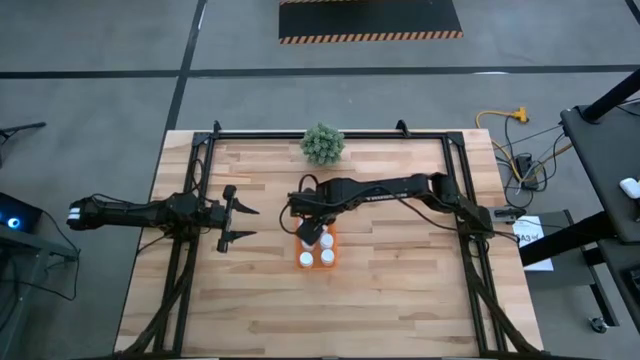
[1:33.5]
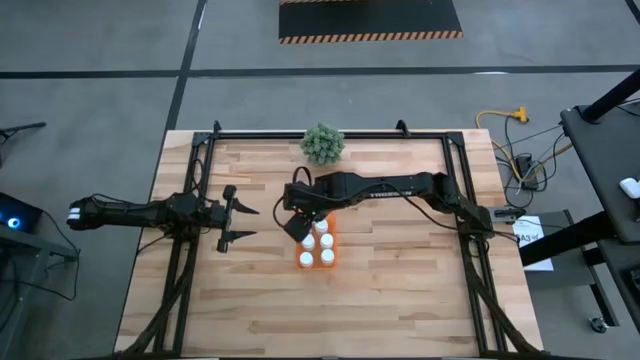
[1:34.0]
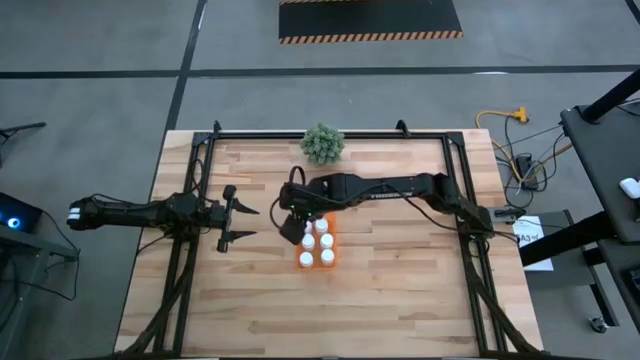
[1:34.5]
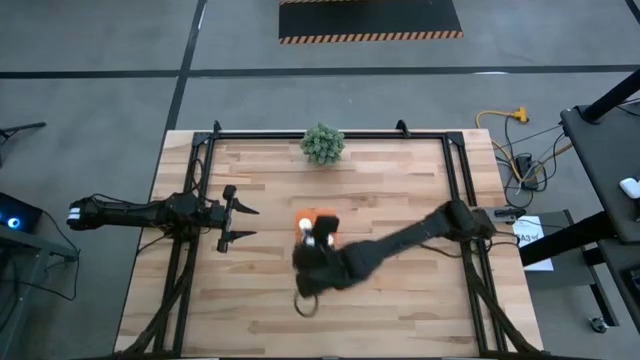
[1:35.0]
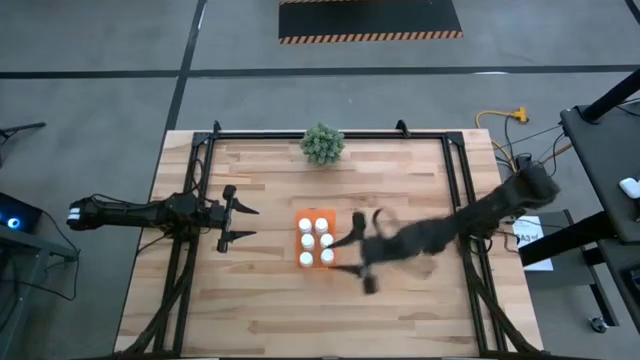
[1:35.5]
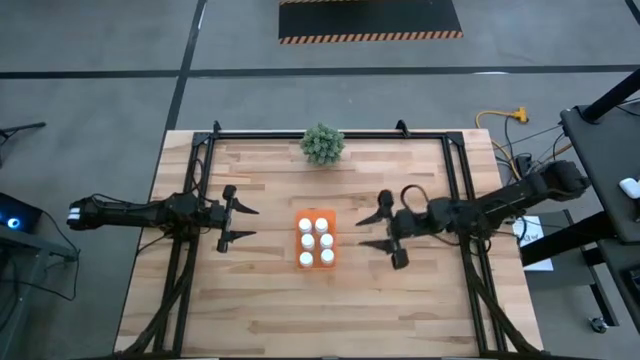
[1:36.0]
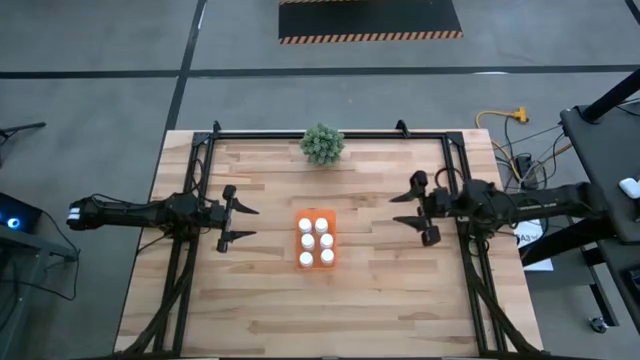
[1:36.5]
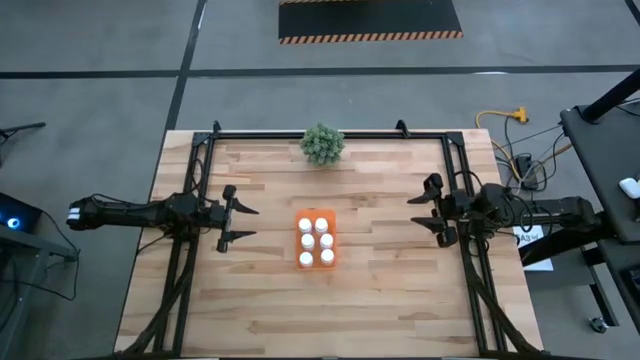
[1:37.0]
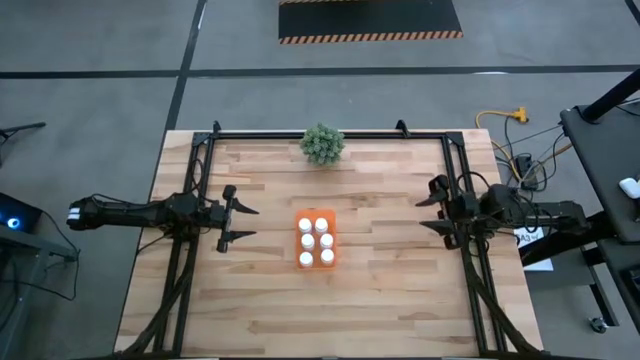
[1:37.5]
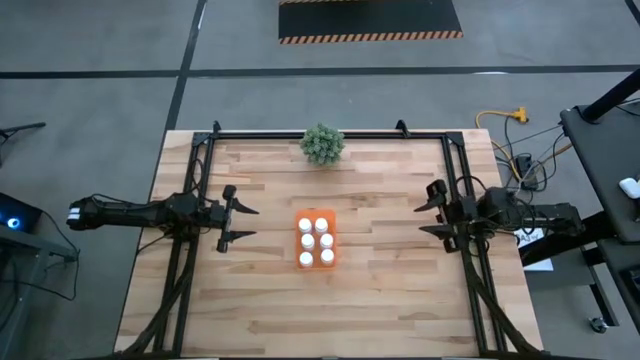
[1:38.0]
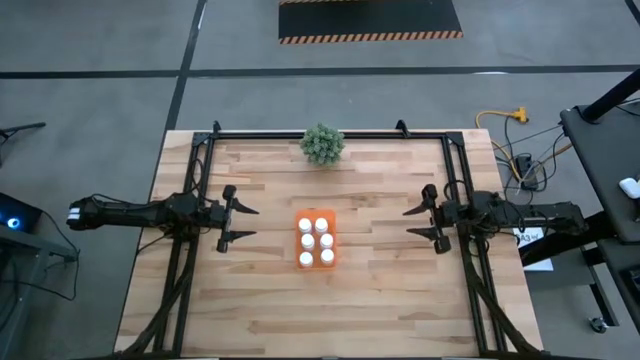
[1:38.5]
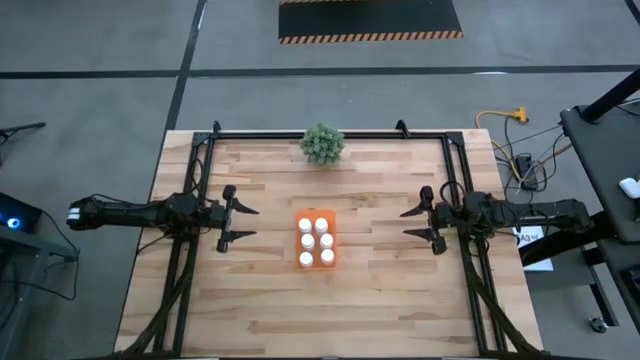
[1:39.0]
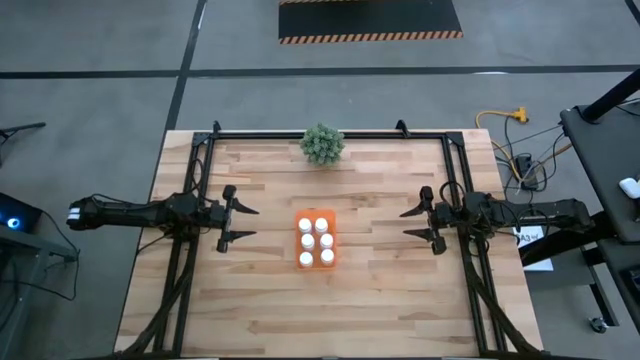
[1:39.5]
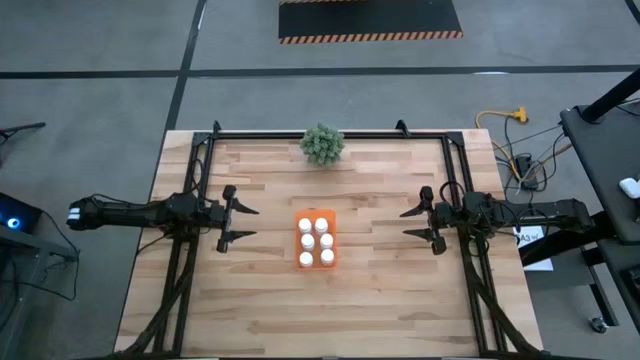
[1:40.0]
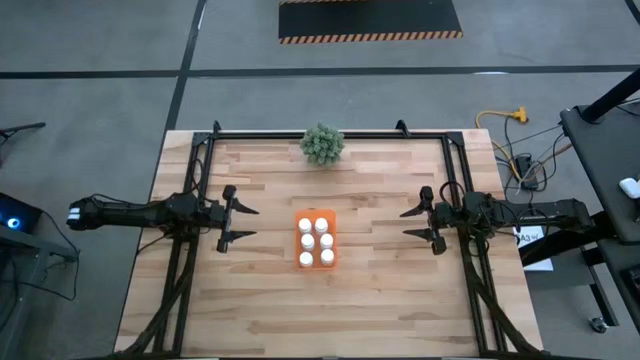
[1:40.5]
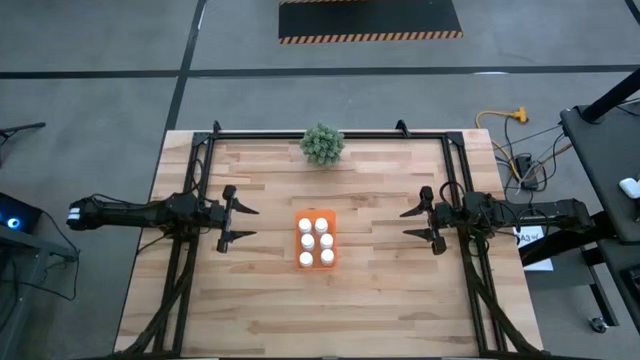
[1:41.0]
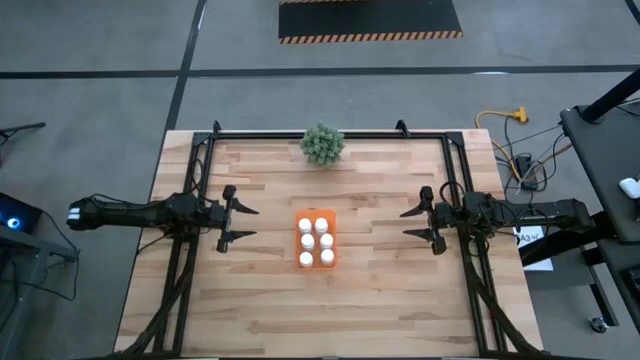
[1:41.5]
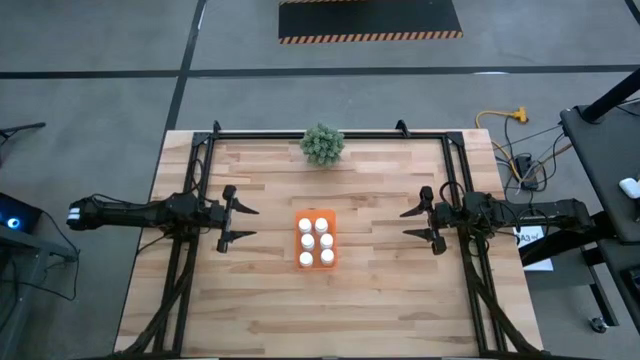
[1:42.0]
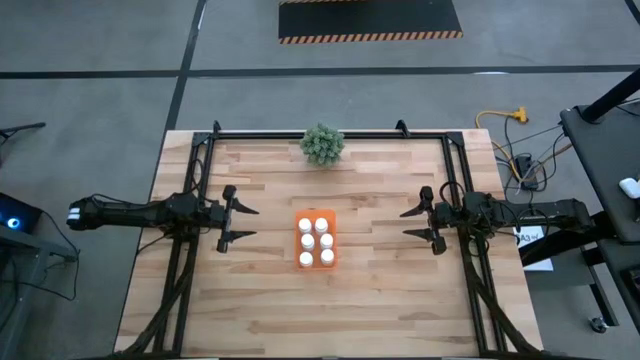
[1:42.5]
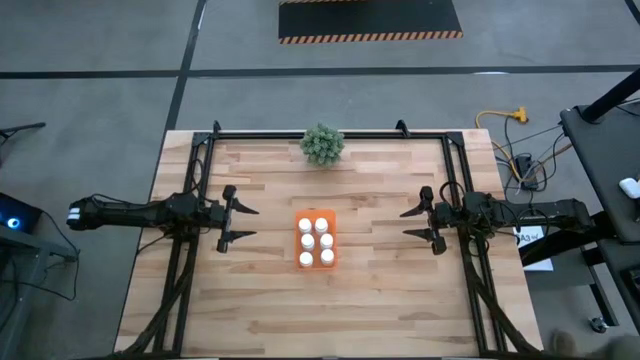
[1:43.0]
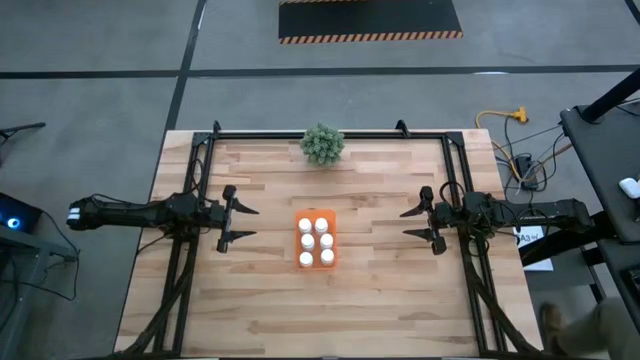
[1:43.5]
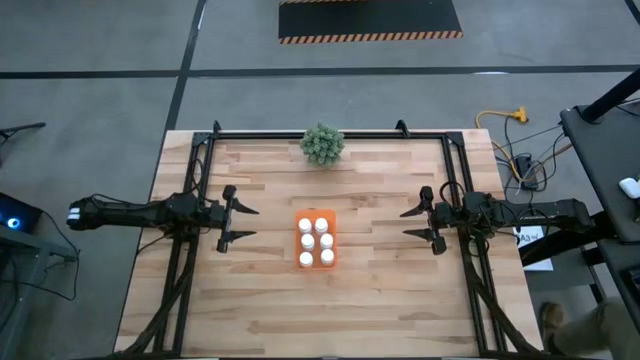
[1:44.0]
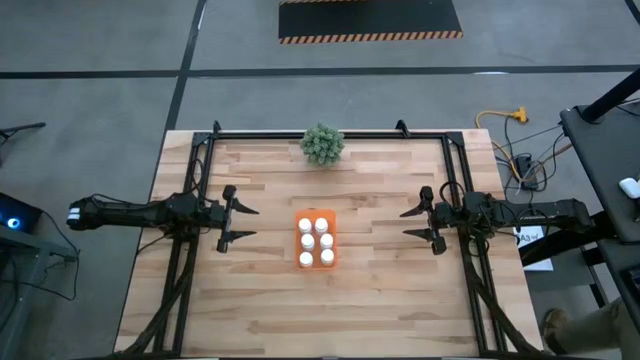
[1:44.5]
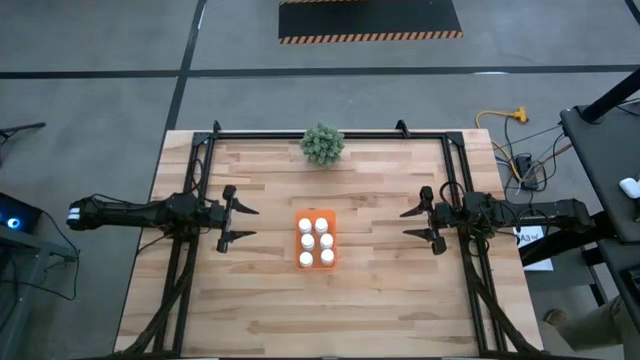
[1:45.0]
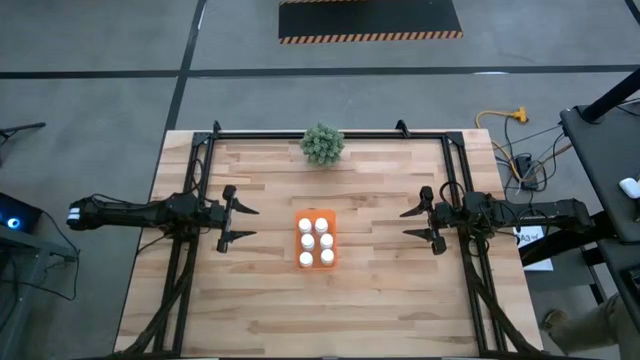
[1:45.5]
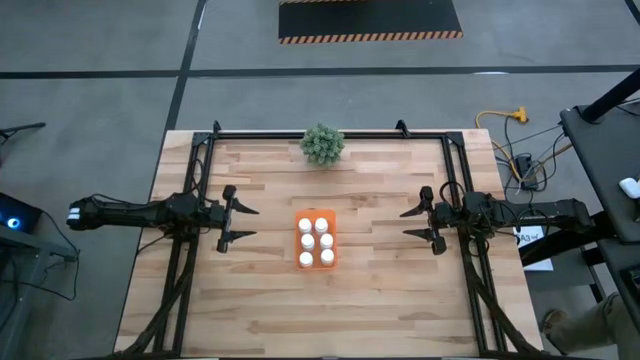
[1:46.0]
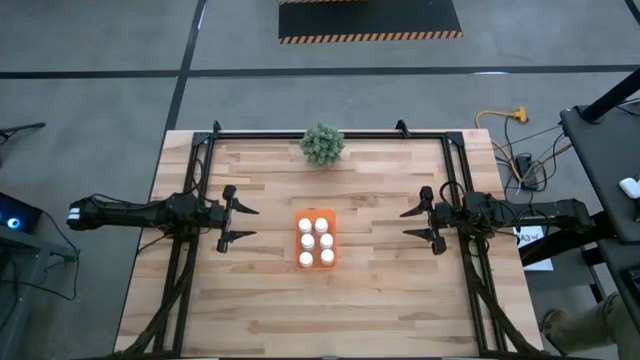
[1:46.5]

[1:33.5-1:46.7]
Task: Pick and place pill bottles into a basket
Return to Home Position

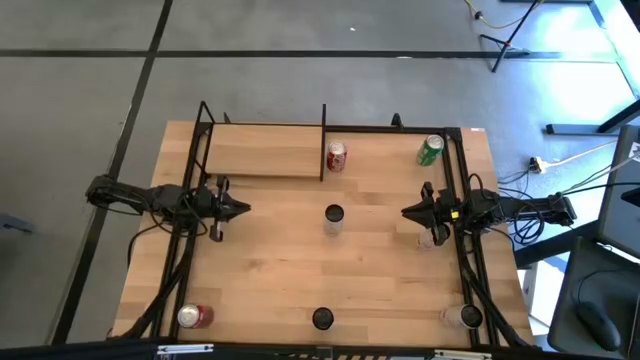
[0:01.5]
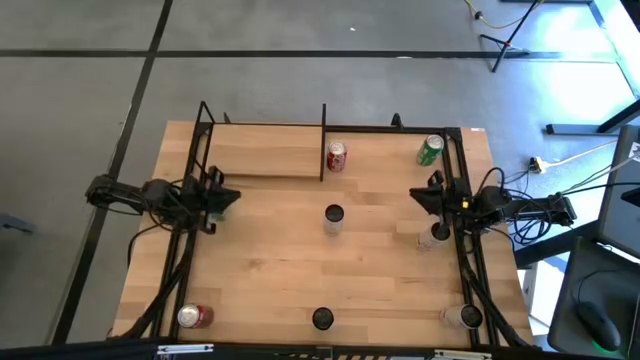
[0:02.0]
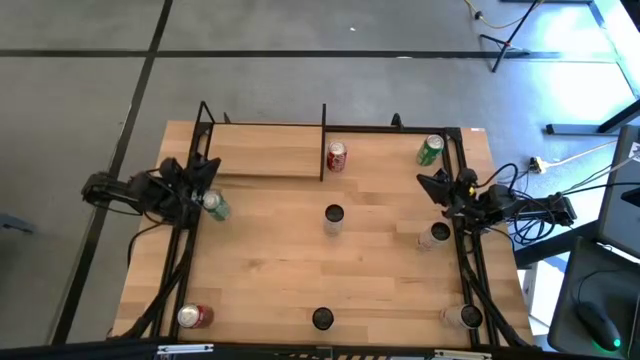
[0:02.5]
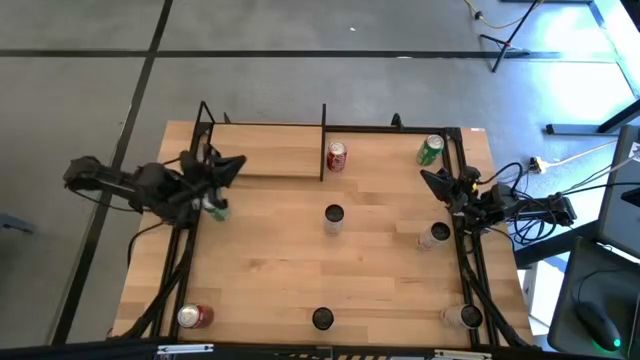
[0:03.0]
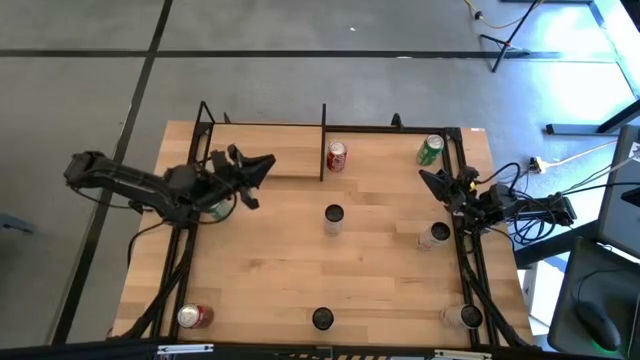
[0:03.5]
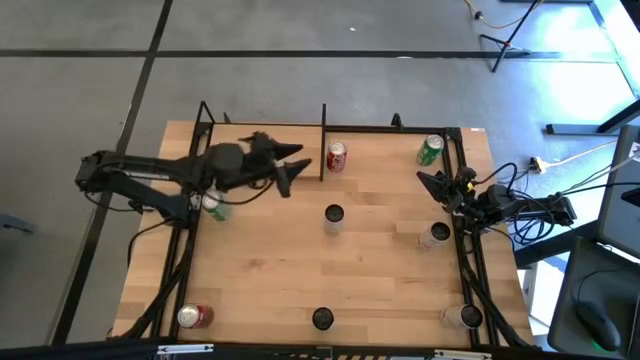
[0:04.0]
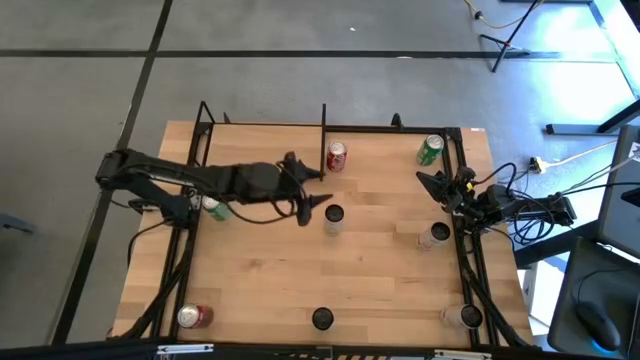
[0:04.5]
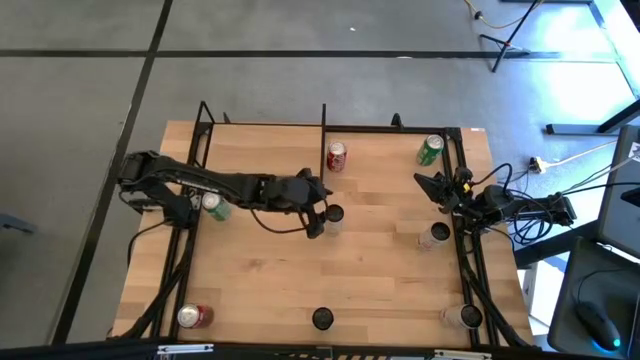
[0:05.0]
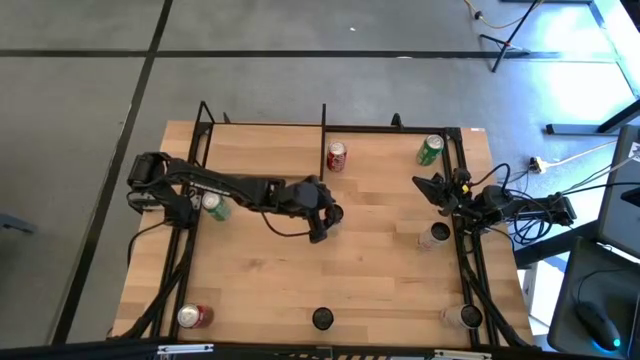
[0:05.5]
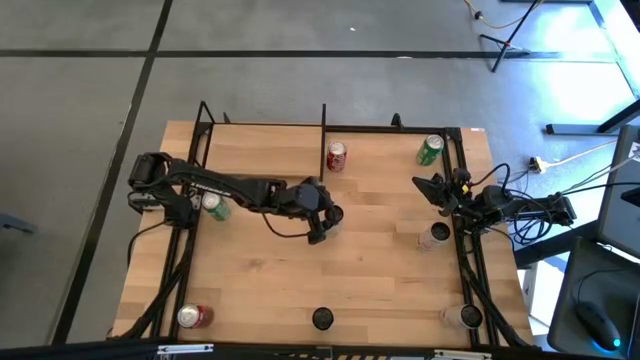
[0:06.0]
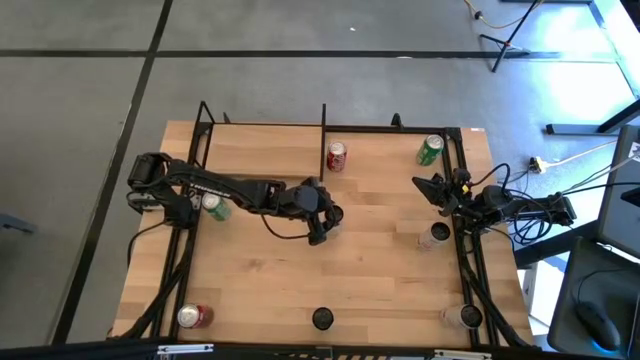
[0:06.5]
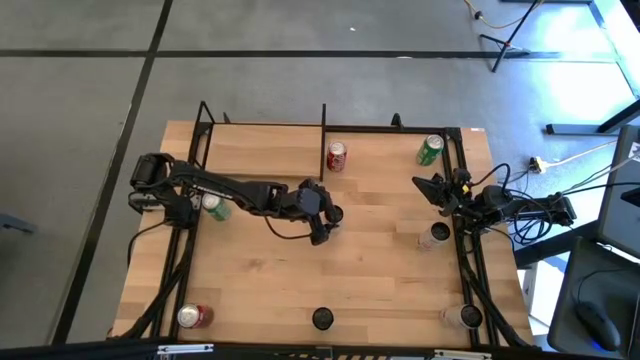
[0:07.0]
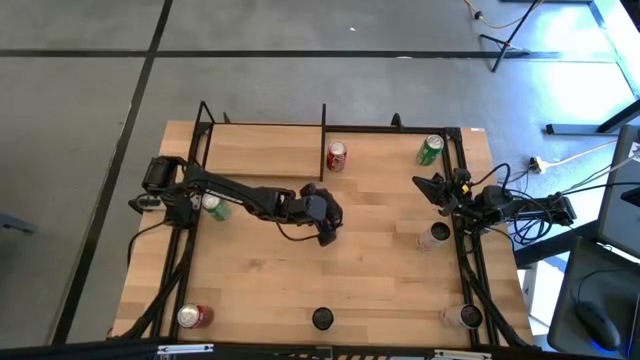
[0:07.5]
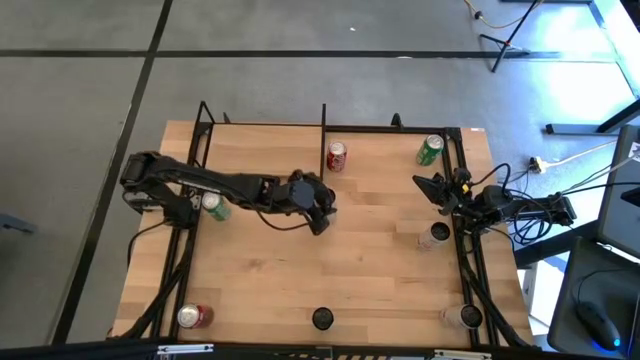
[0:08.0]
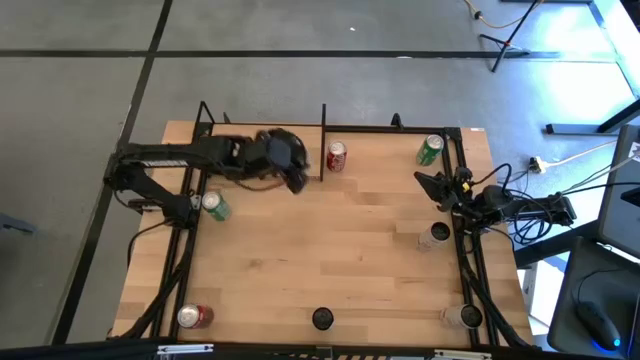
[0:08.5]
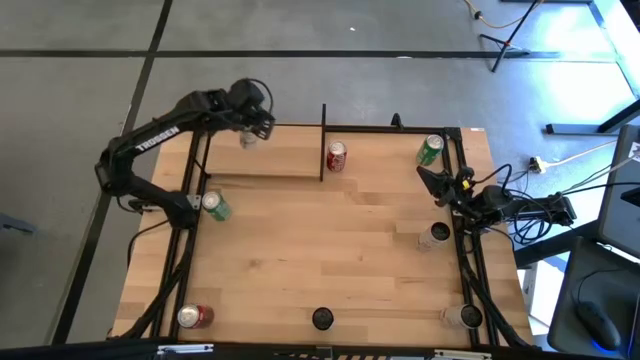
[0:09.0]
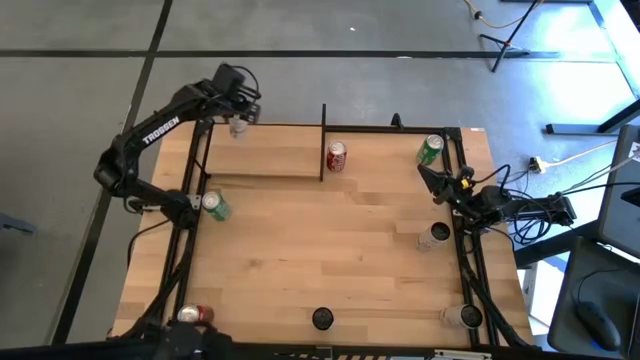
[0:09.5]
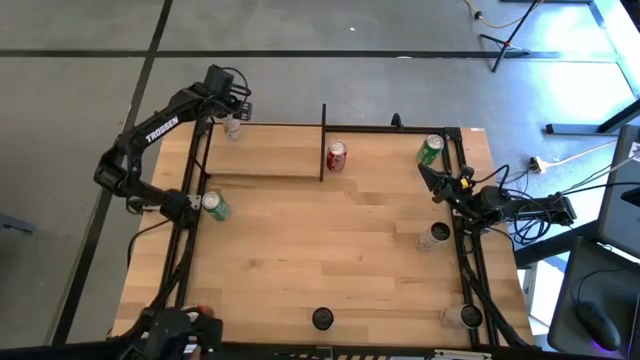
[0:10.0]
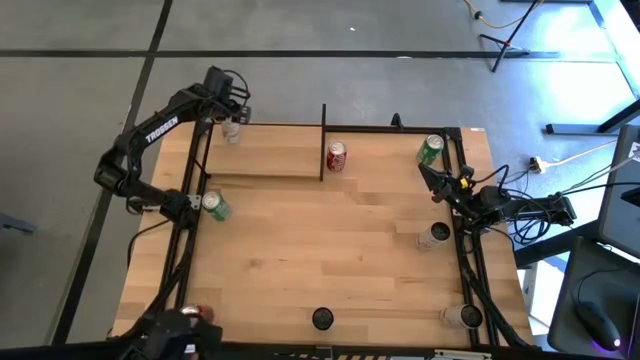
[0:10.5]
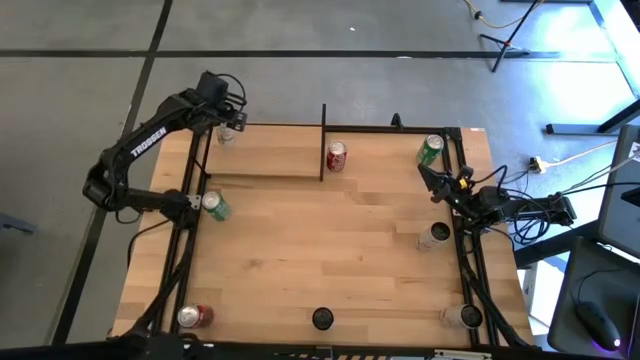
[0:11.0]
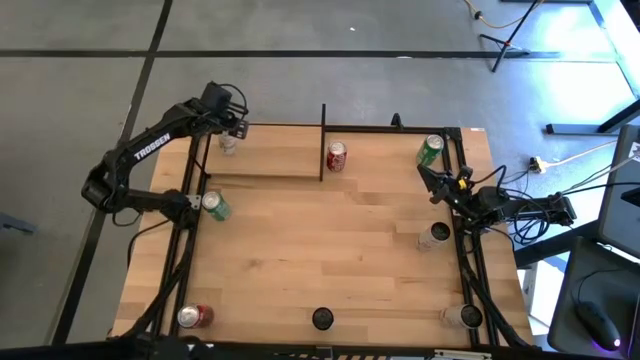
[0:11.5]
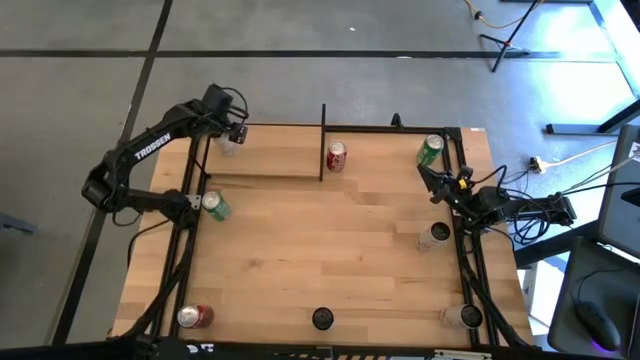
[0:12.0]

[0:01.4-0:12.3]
Task: Place canned beverage on shelf
Put the top white-yellow soda can on the shelf
